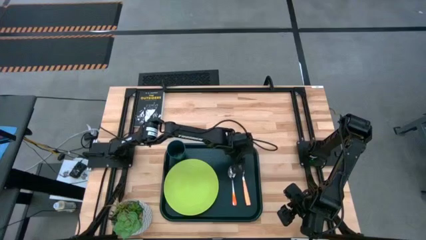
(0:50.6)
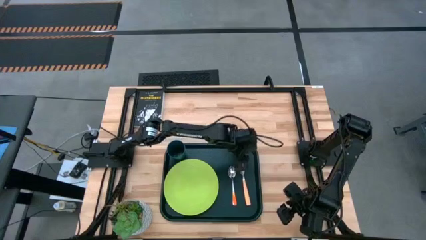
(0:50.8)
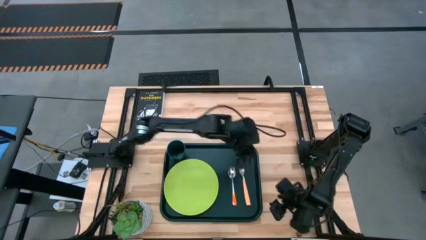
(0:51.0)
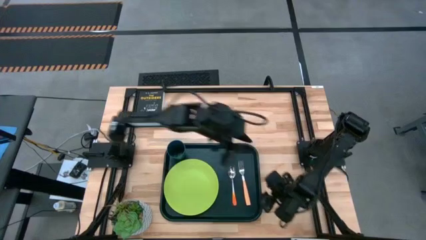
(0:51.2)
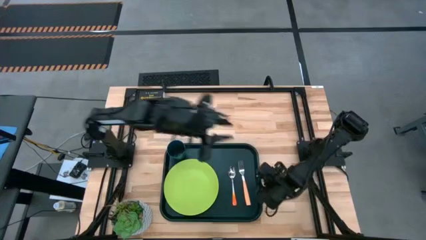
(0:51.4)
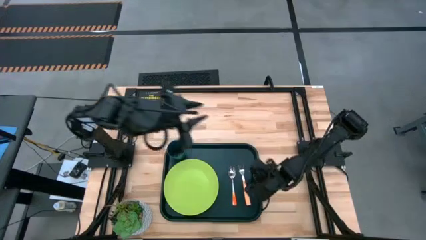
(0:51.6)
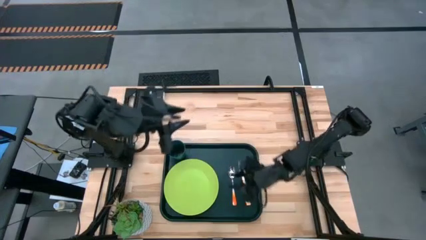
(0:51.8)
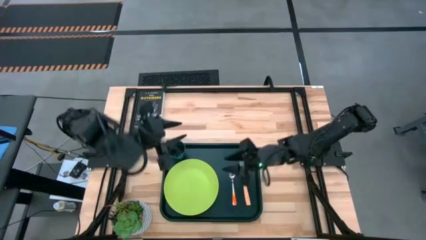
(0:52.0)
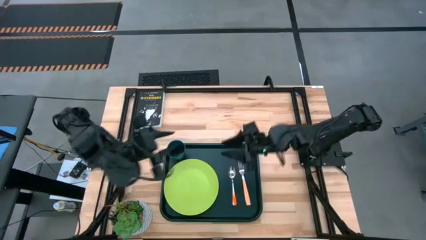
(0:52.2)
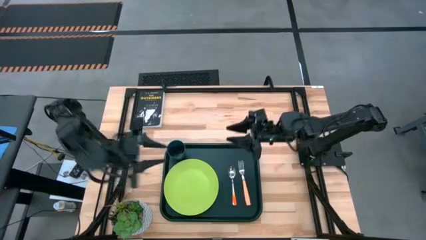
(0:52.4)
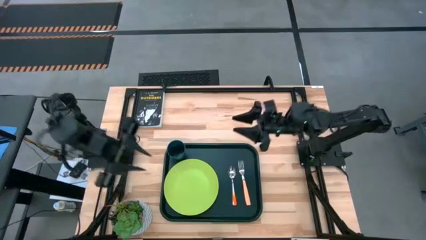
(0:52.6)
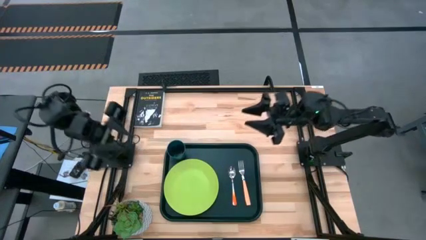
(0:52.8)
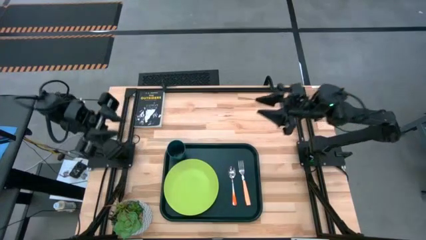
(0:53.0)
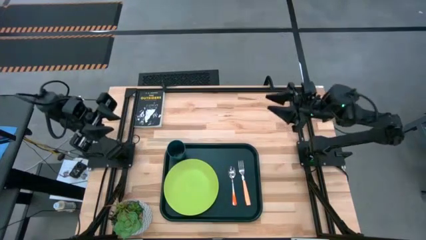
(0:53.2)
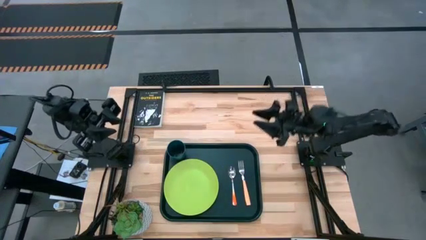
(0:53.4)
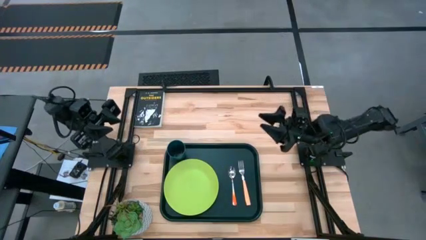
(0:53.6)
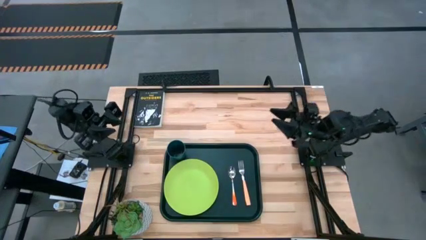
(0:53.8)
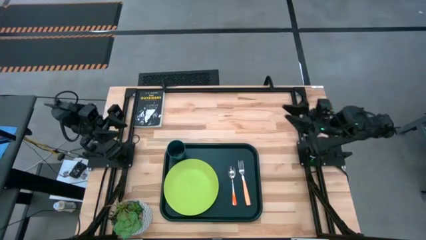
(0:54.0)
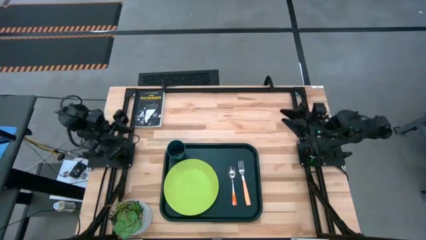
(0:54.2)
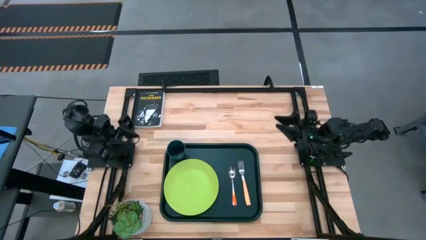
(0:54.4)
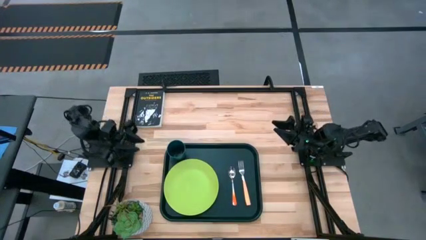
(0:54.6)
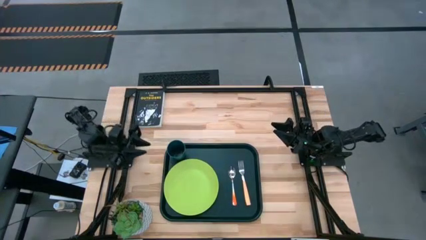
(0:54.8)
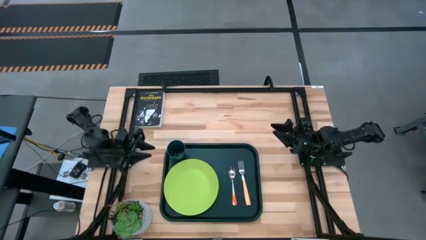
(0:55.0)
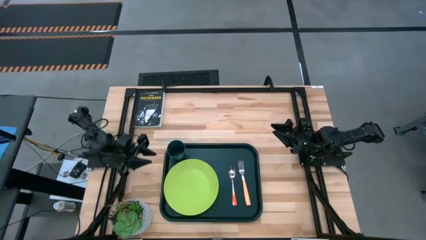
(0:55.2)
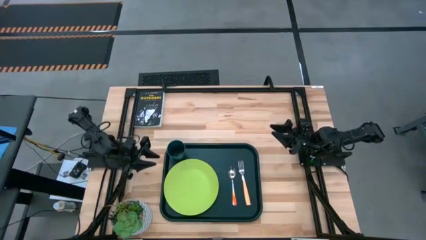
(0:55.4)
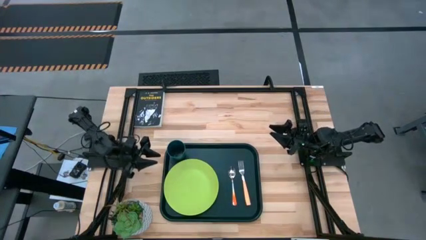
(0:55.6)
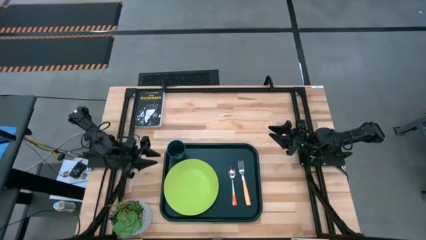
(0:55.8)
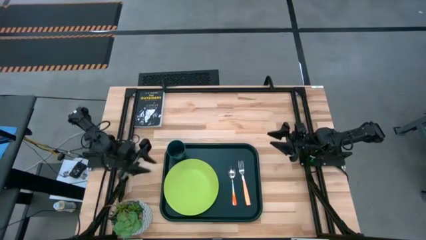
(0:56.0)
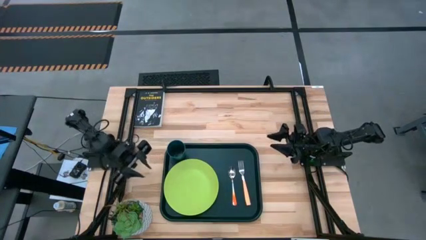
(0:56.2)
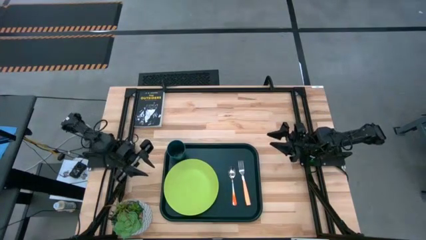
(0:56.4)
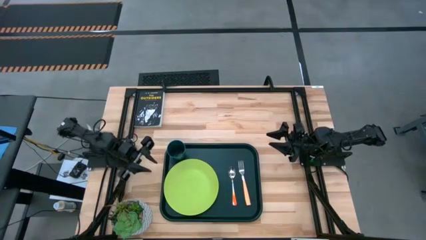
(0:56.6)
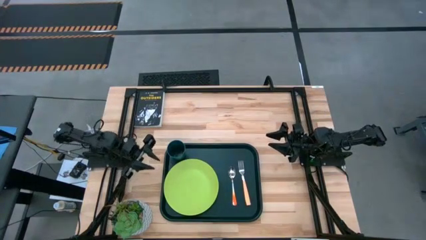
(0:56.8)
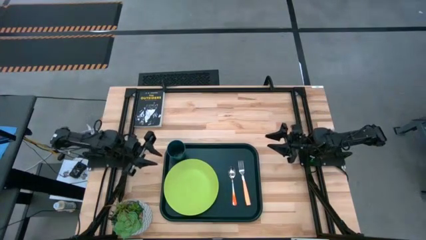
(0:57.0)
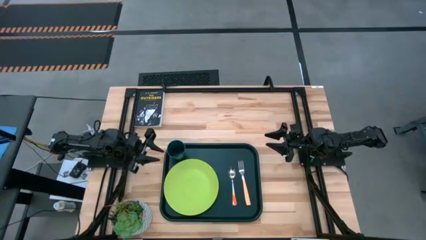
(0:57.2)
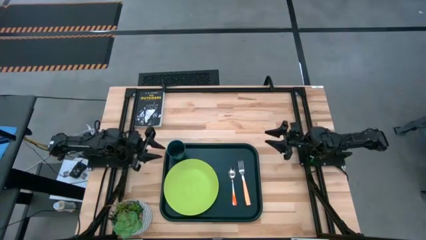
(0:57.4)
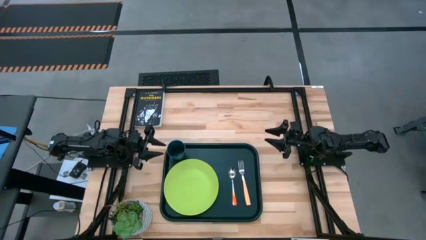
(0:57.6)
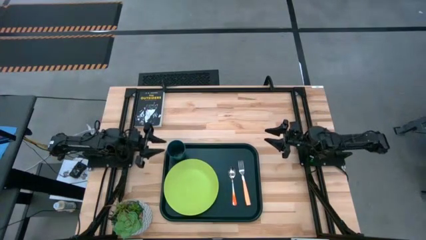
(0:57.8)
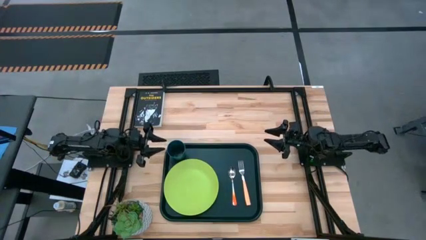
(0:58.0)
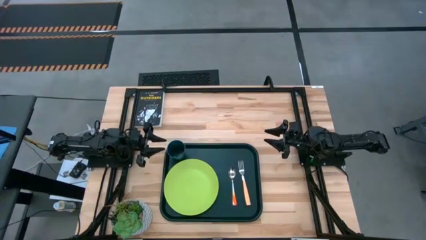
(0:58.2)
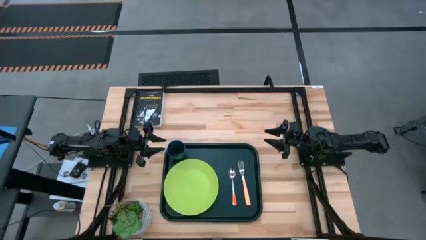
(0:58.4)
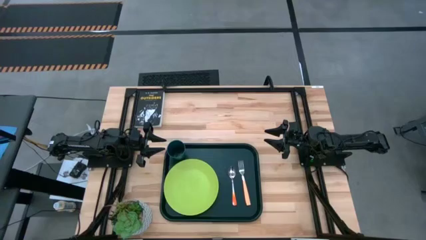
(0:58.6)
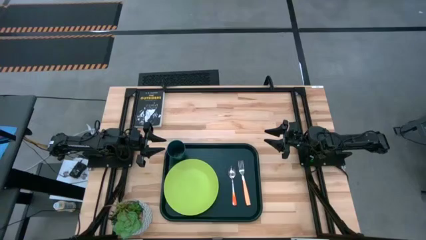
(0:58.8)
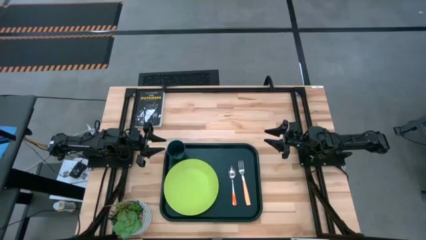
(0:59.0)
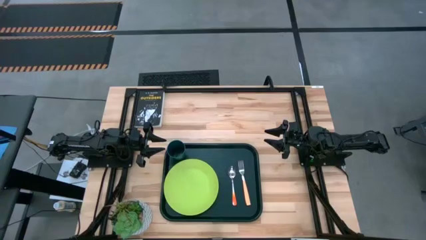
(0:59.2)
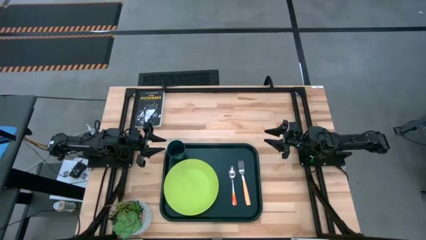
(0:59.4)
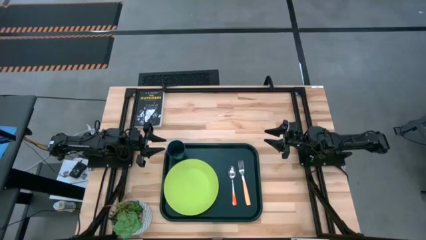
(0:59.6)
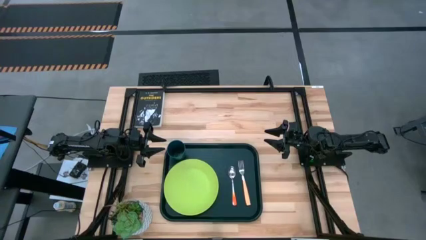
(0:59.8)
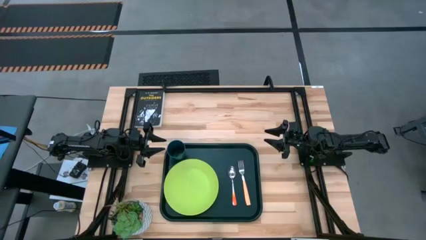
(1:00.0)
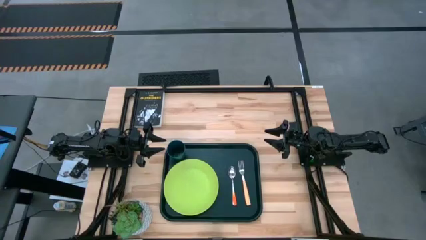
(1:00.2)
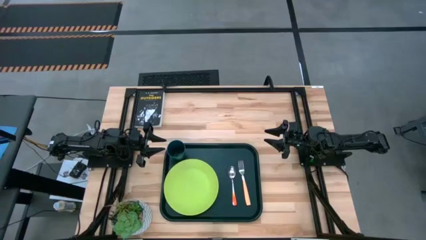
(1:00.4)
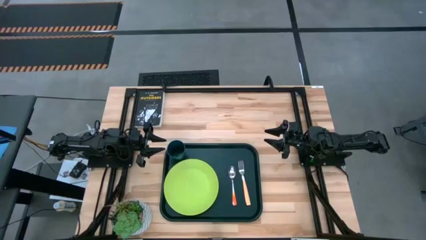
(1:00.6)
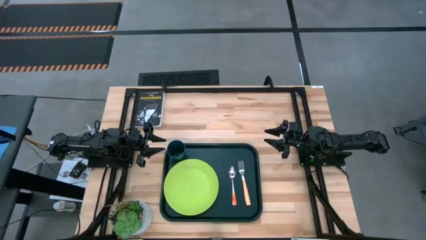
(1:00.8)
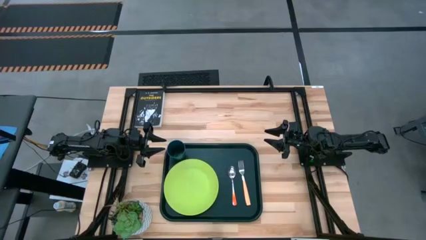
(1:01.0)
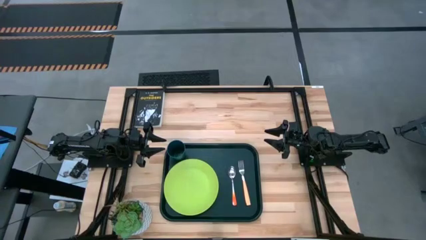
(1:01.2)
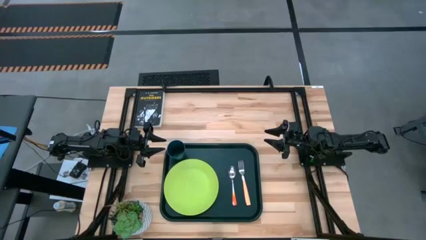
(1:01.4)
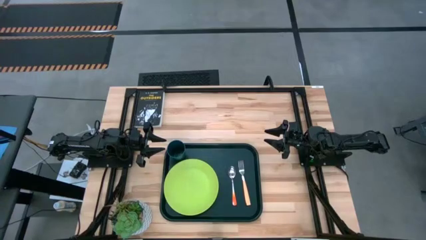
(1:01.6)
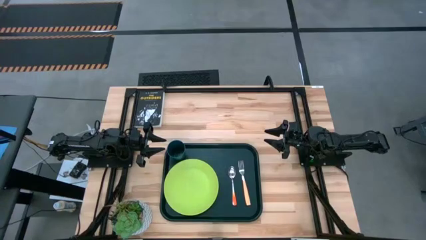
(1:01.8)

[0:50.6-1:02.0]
Task: Pick and place plate/cup/fork/spoon on tray
Return to Home Position
